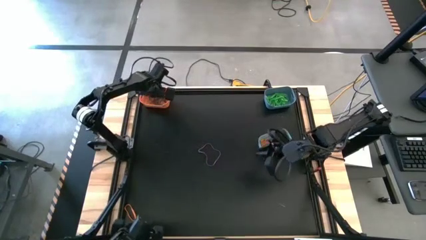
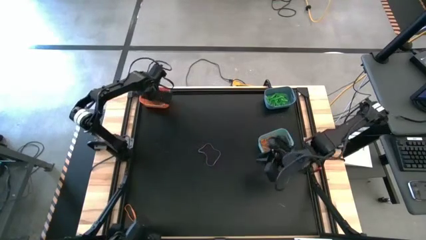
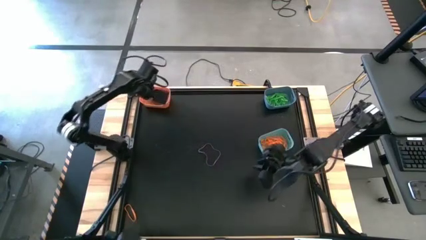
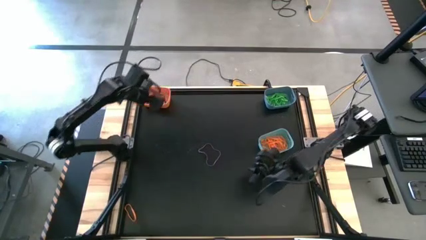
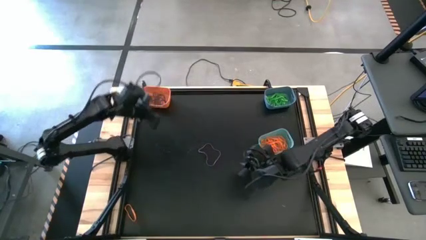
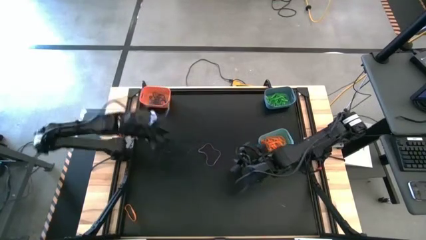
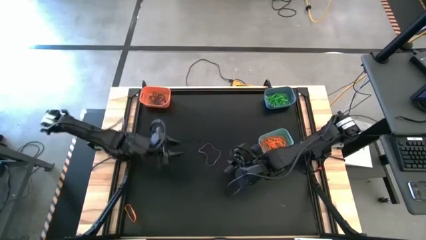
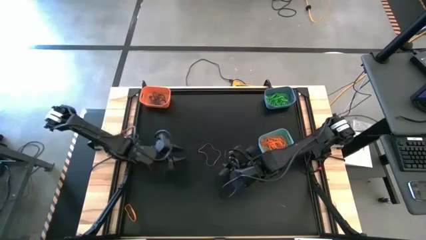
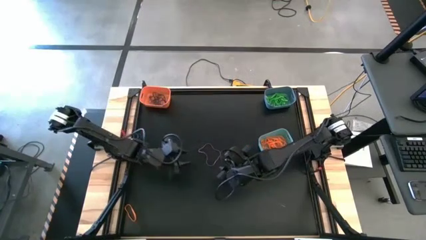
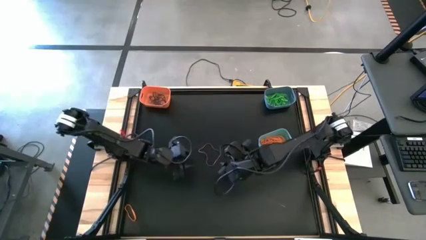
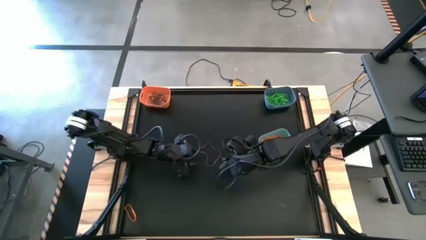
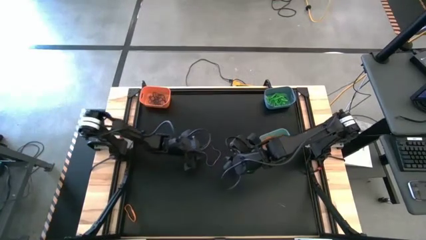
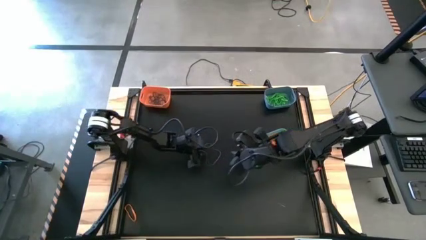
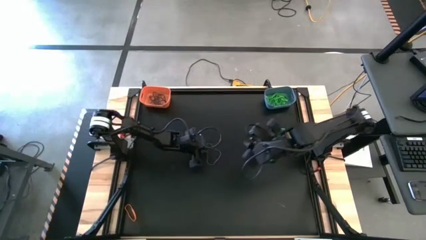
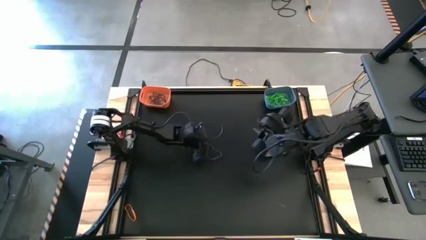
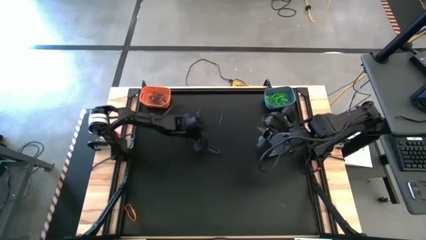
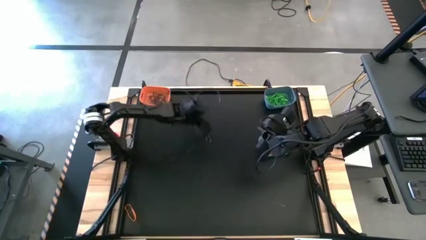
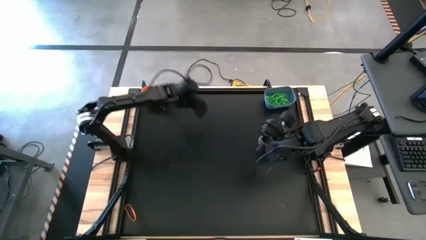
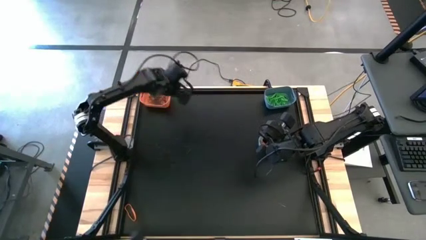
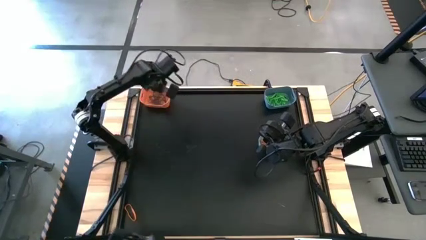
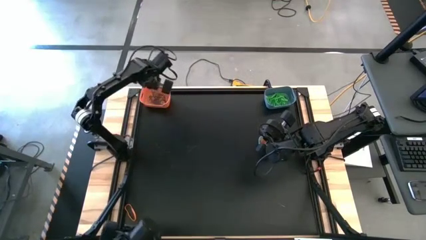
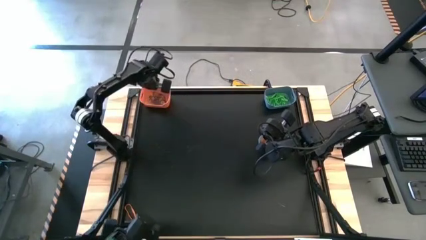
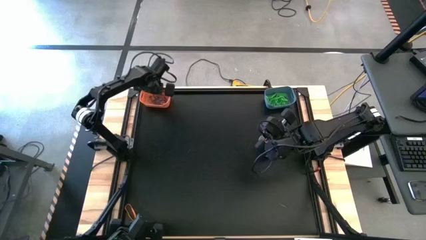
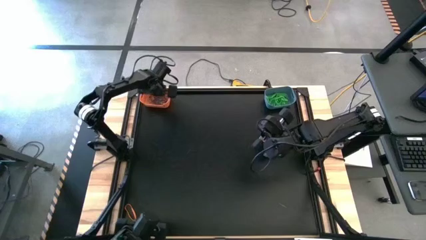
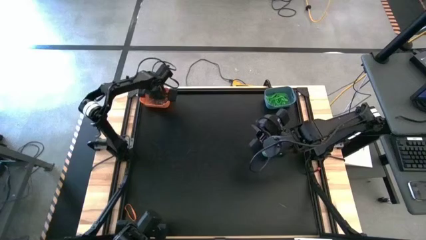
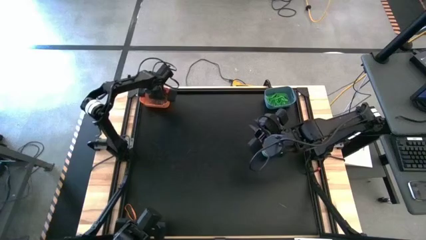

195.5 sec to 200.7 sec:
Task: Sort rubber bands into baskets
Put the purple rubber band into the orange bin

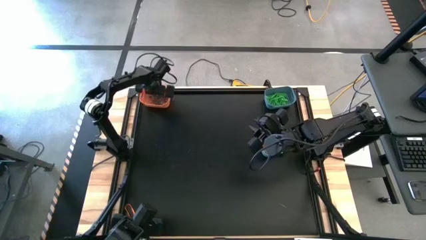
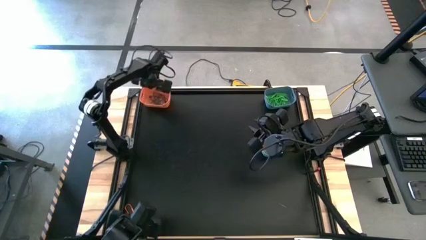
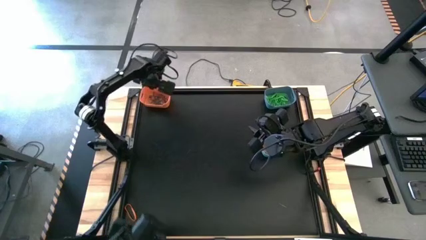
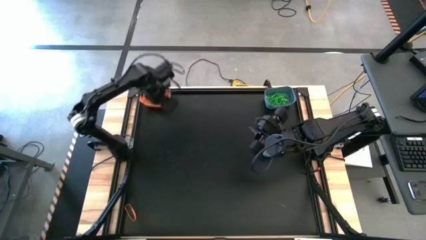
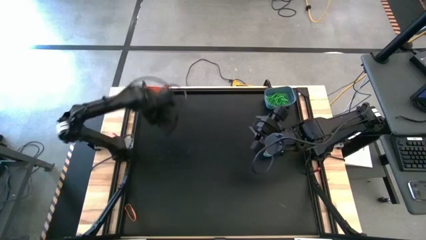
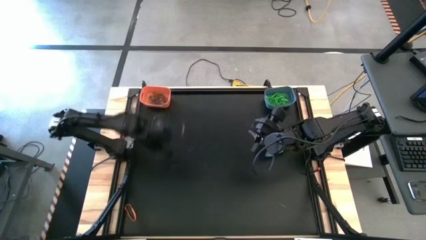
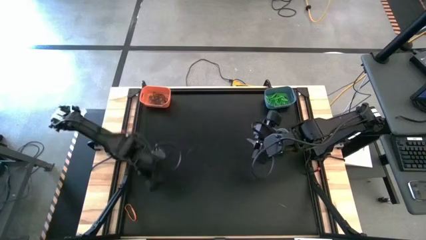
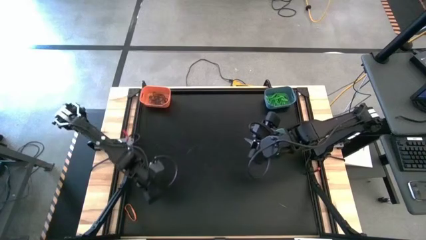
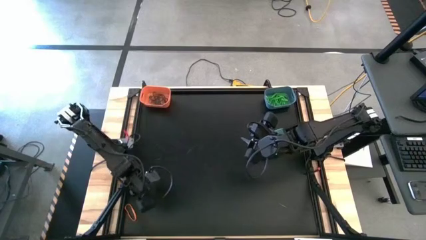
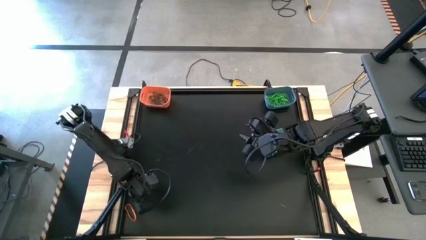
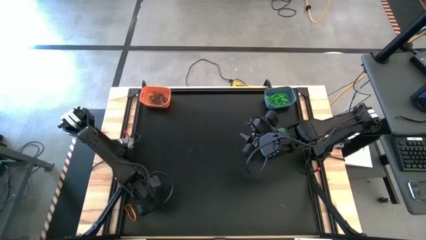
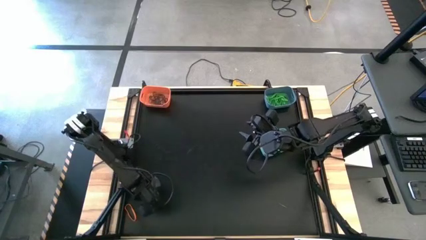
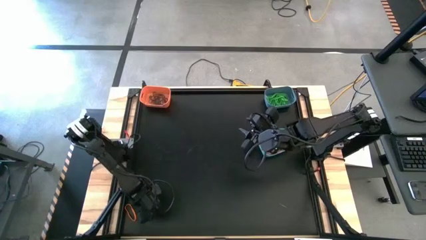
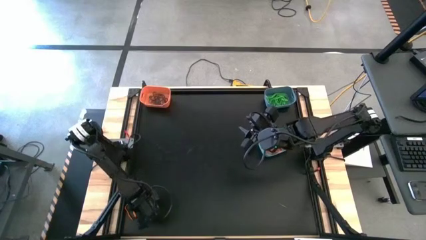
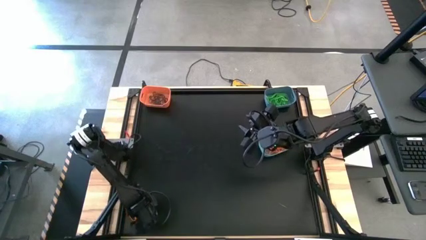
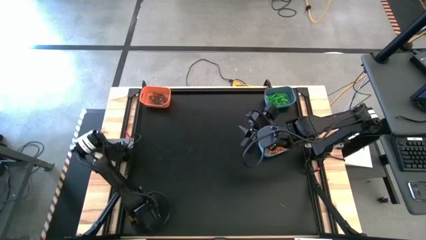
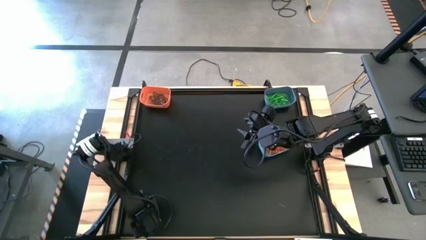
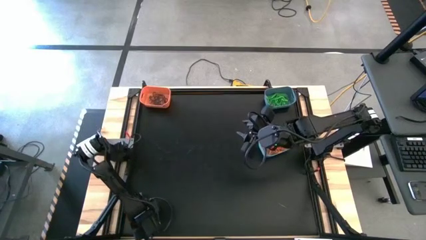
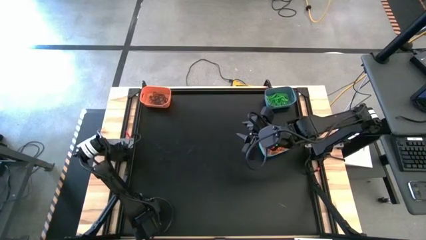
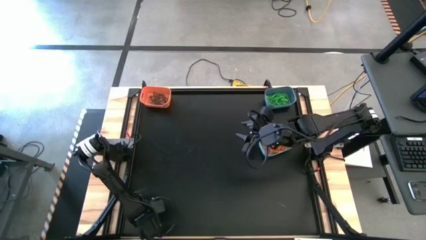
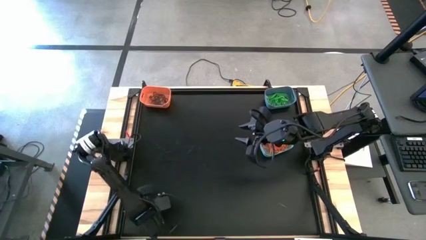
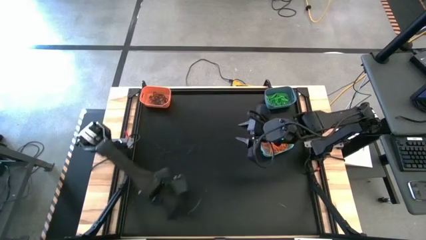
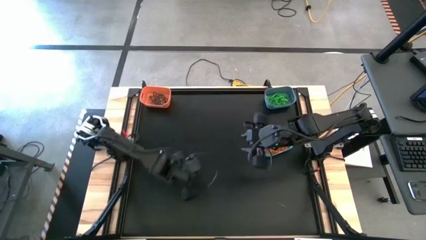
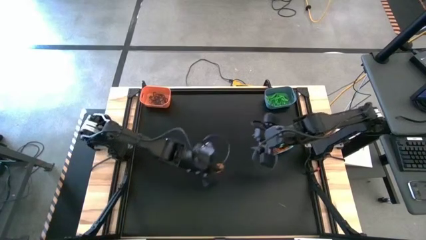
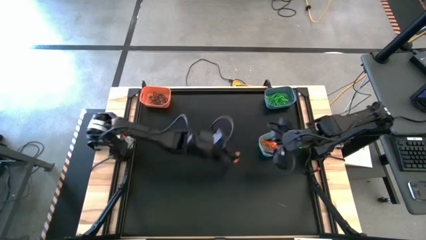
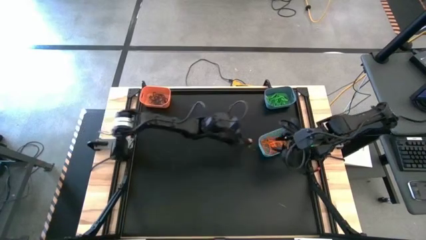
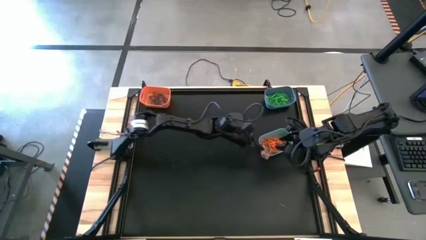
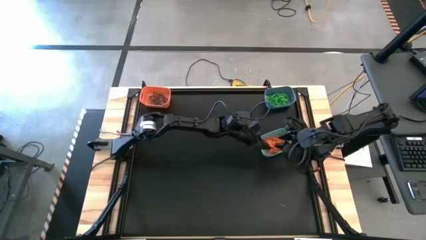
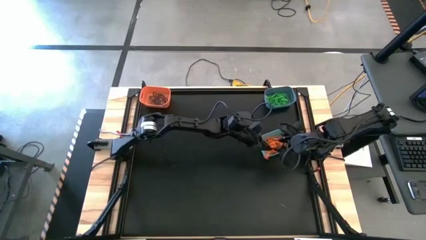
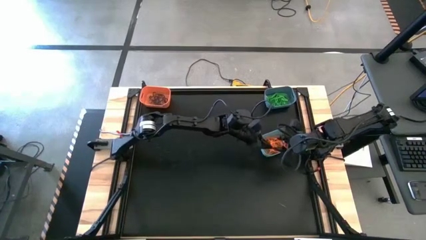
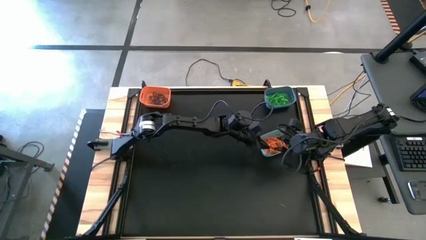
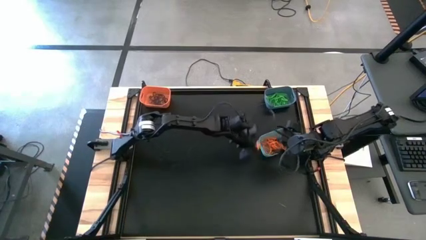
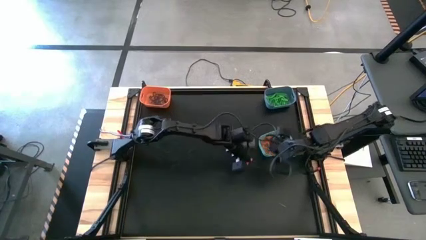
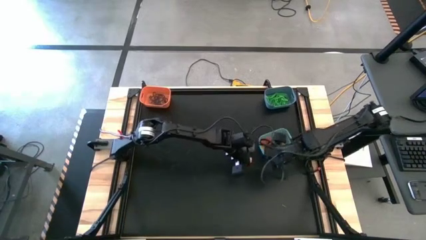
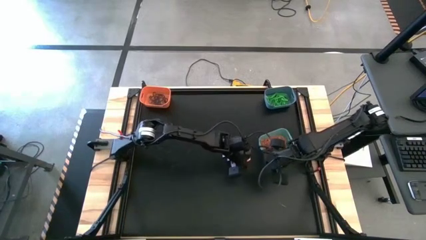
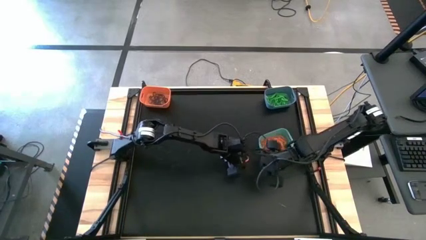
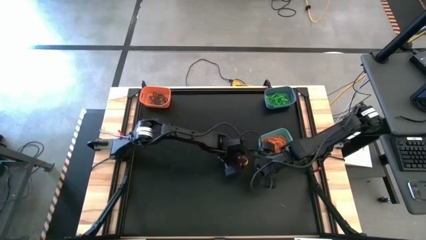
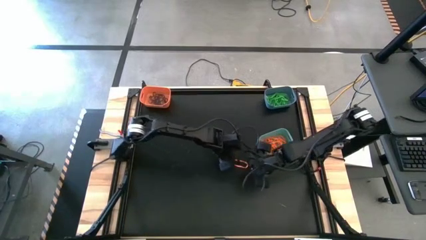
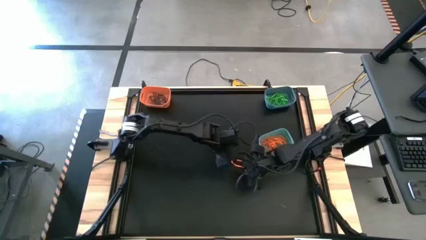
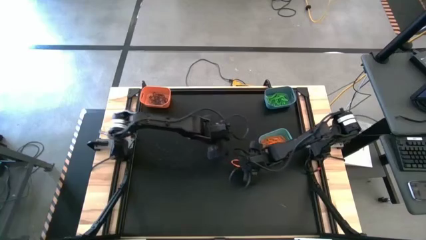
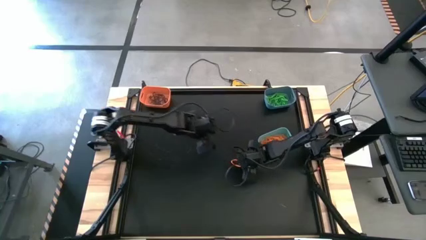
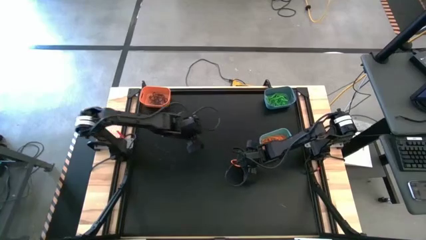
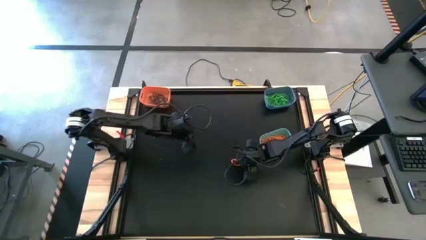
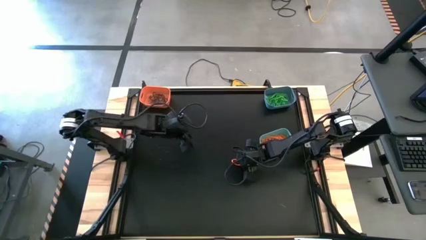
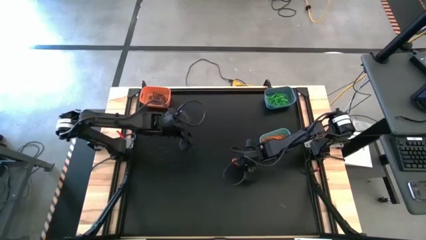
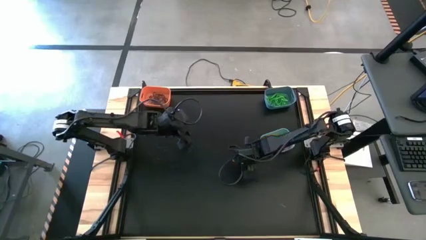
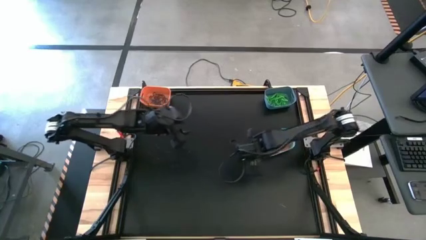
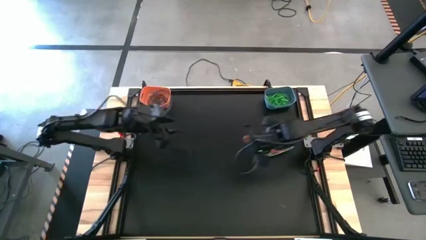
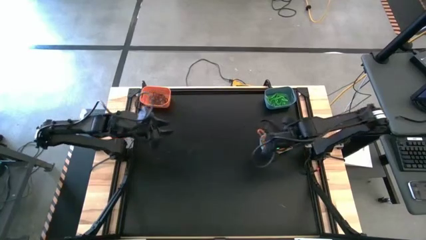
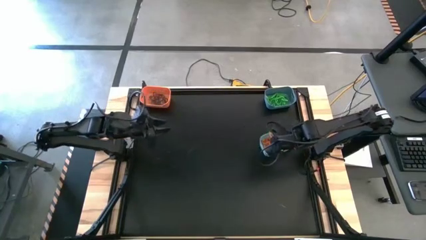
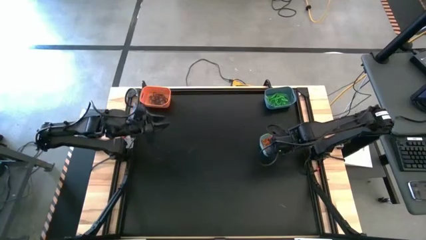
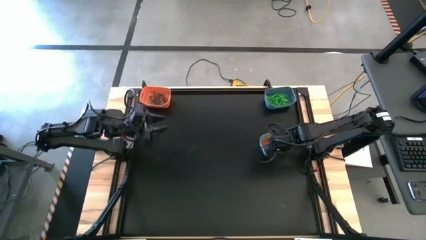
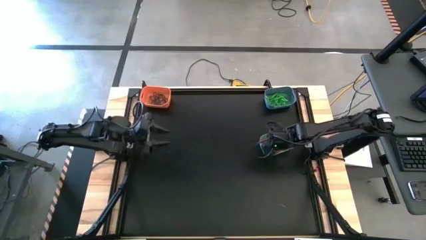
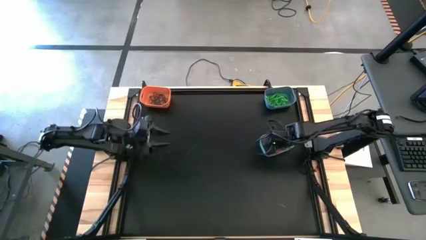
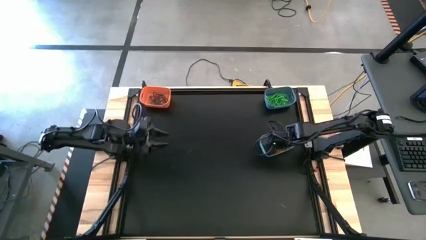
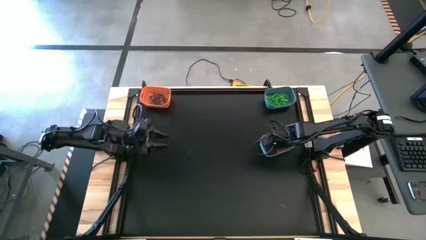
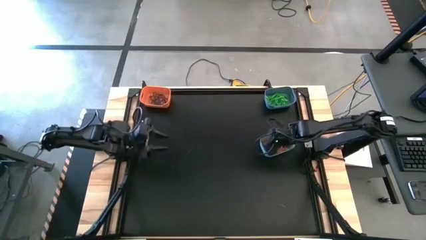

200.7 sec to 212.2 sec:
Put the orange rubber band into the green bin
